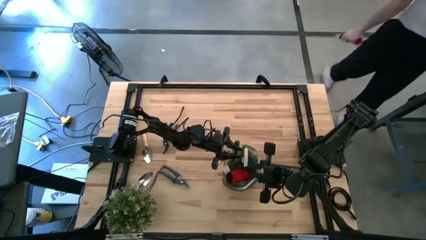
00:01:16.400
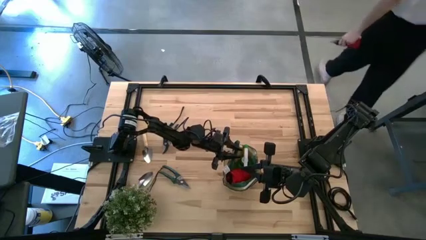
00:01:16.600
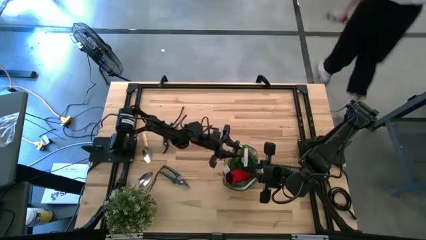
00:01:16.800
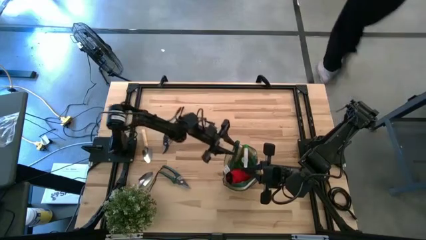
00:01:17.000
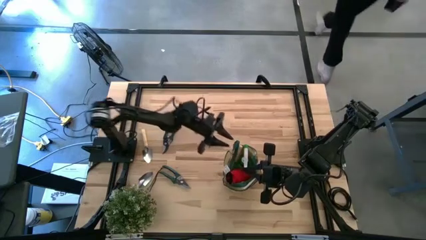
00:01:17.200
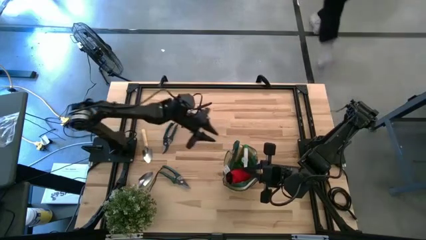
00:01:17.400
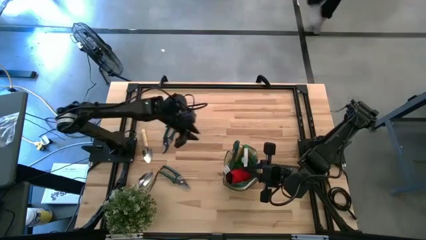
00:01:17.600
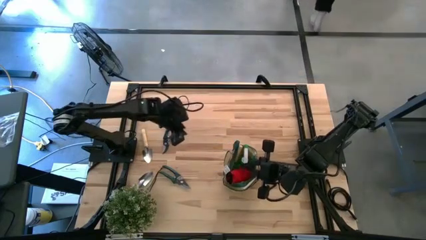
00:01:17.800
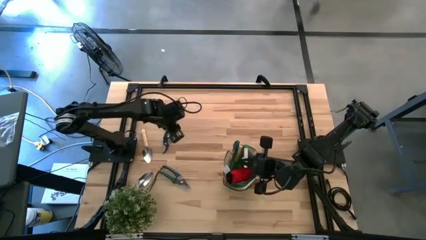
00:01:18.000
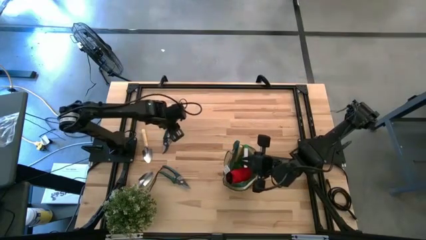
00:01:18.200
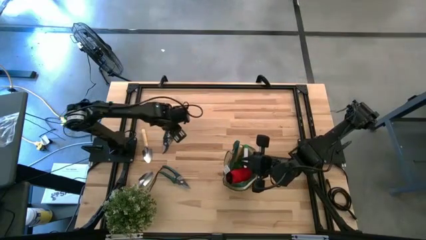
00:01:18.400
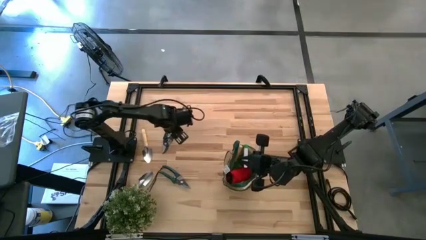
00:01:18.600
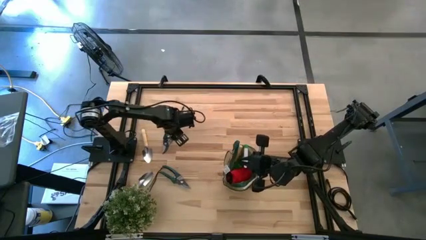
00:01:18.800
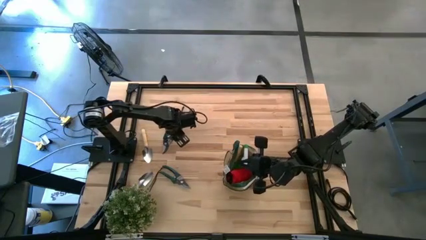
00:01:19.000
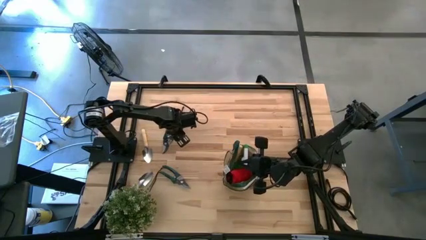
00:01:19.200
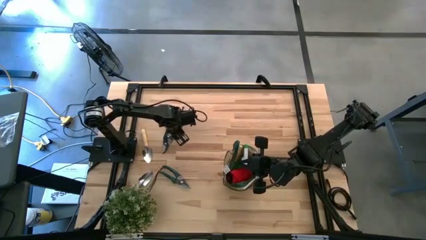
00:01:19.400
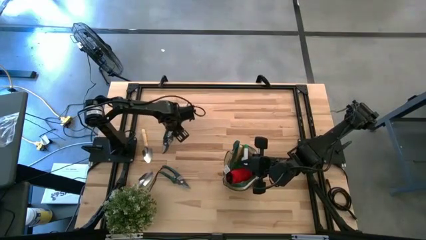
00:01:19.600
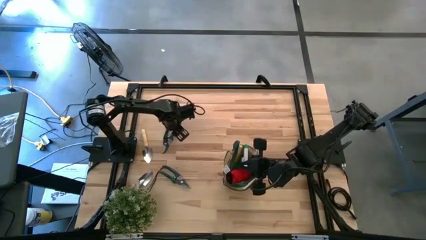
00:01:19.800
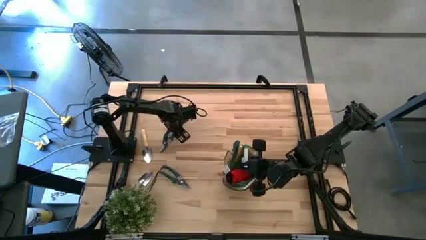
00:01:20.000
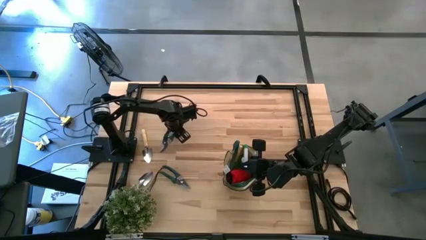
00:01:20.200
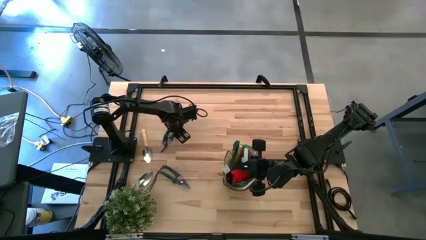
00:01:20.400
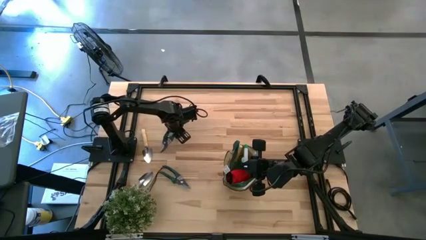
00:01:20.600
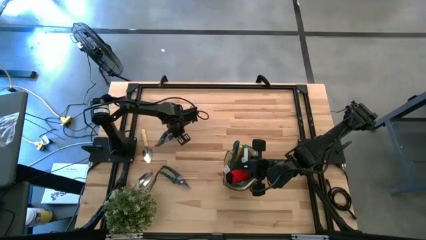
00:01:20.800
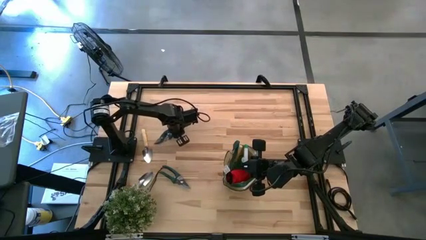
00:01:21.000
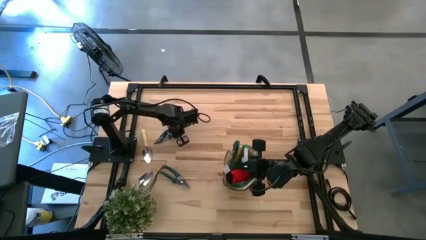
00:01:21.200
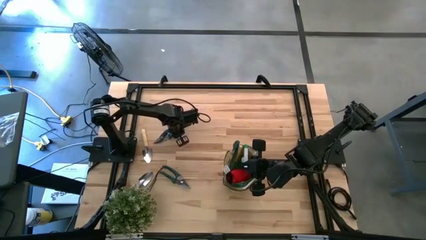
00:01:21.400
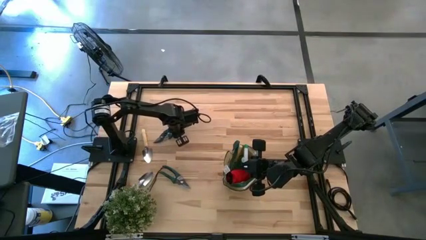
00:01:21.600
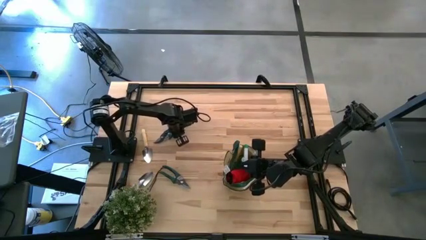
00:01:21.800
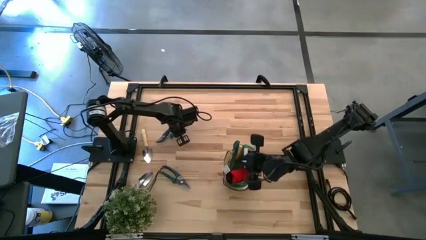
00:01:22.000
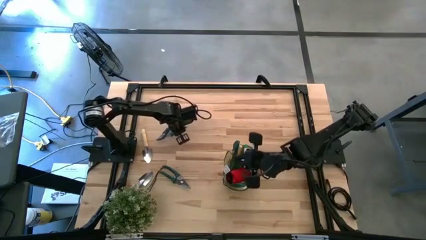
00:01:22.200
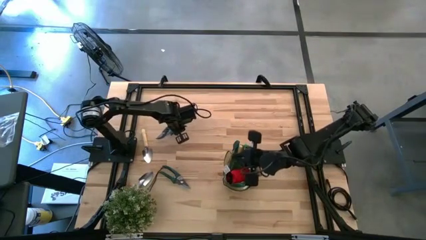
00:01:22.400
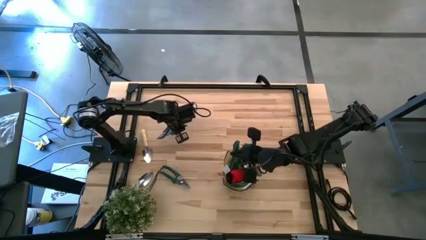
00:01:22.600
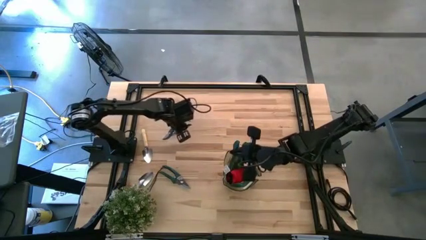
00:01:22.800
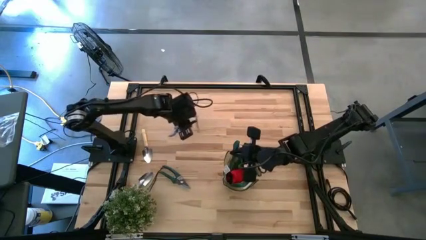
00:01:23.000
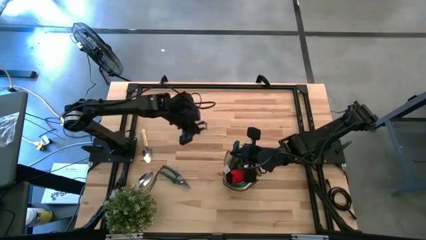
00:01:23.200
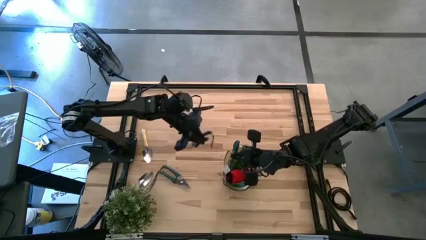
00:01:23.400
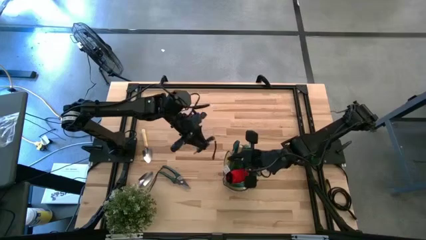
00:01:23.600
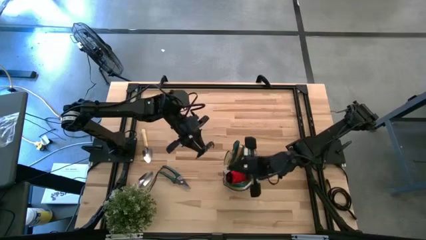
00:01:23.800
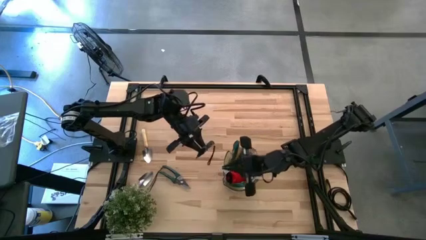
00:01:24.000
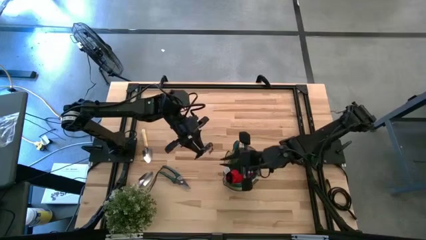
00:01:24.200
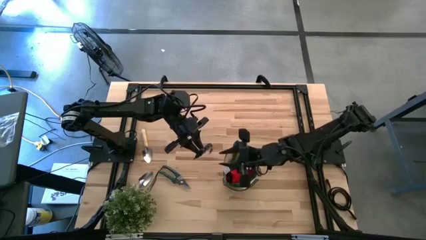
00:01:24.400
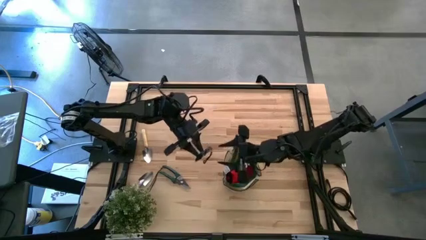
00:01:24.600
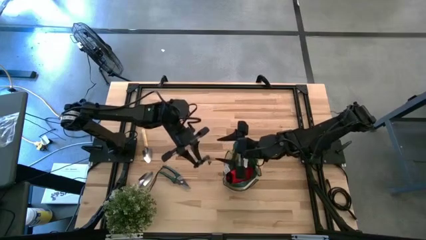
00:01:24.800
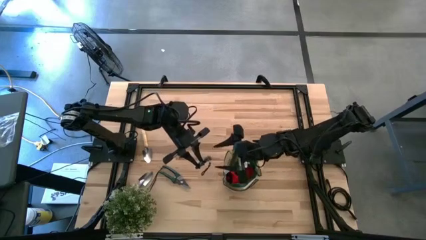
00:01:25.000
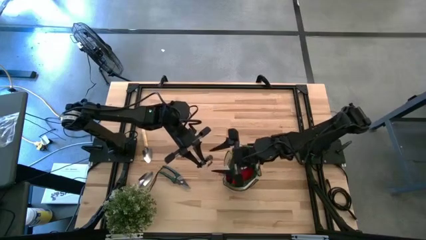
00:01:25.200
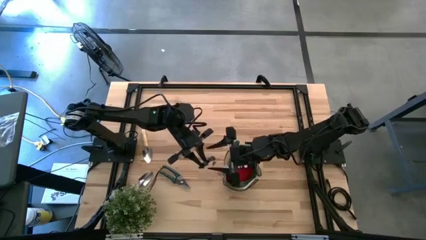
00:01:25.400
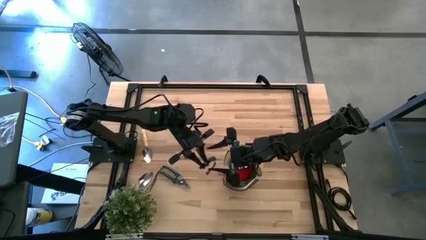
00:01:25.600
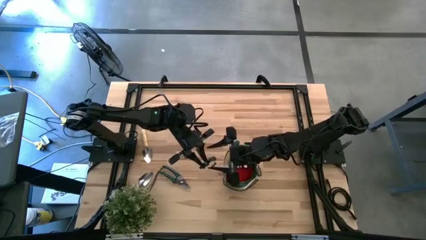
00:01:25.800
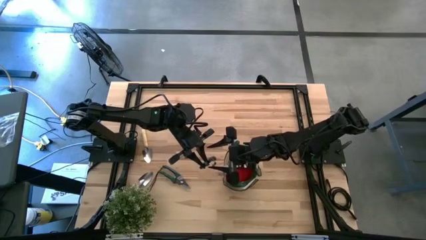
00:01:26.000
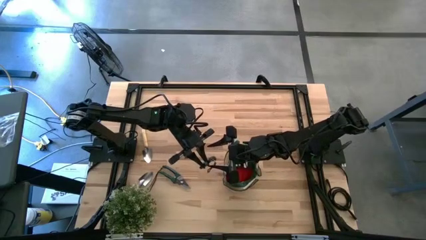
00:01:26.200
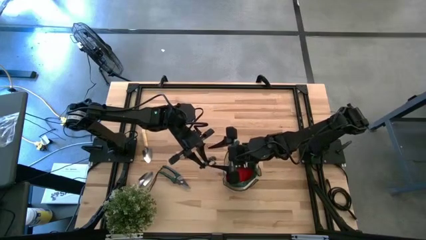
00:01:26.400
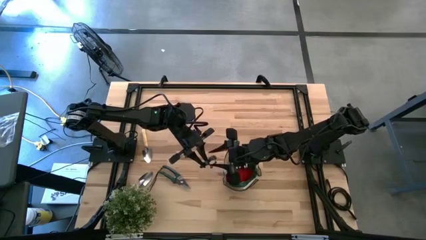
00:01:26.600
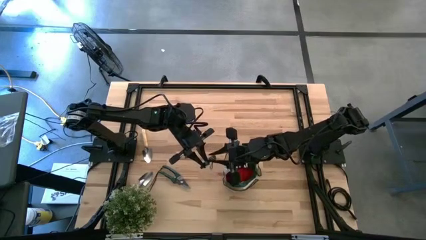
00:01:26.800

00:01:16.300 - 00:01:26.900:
Task: Pick & Place Garden tools in Gardening bag
Put the top green shear scissors into the green gardening bag

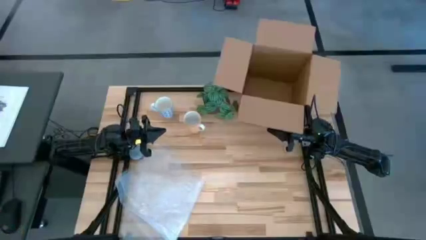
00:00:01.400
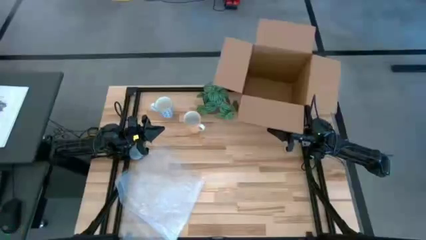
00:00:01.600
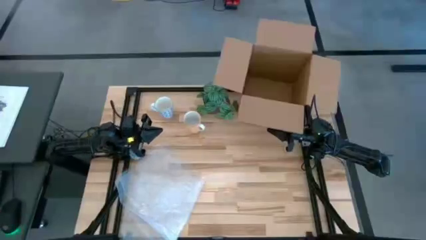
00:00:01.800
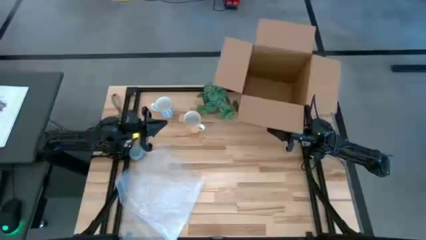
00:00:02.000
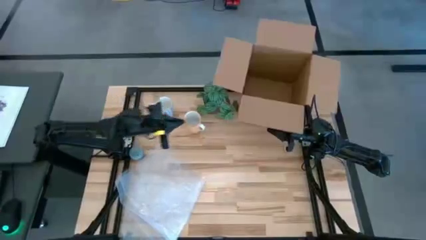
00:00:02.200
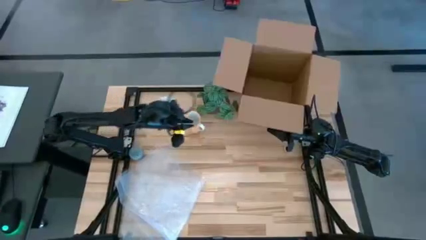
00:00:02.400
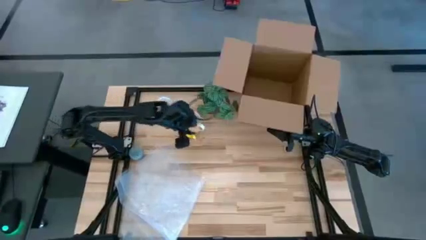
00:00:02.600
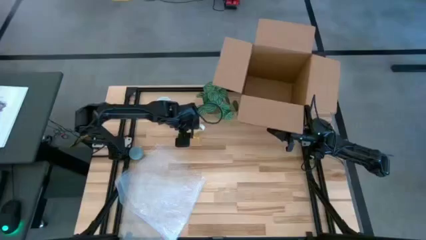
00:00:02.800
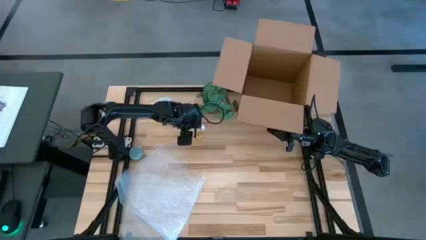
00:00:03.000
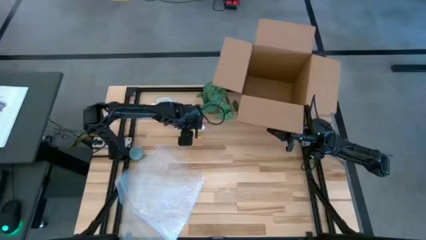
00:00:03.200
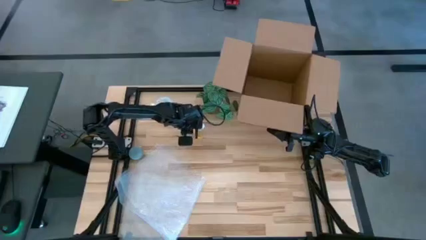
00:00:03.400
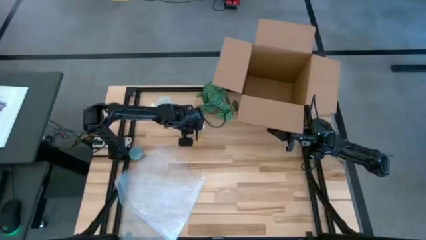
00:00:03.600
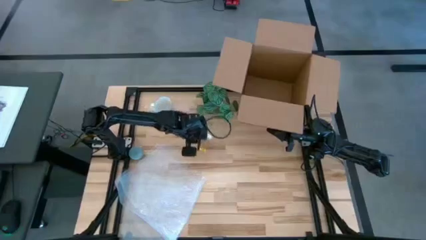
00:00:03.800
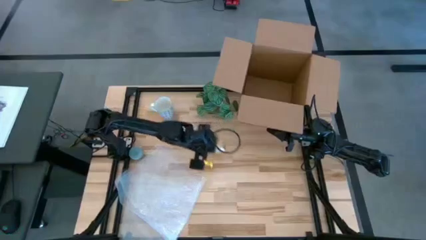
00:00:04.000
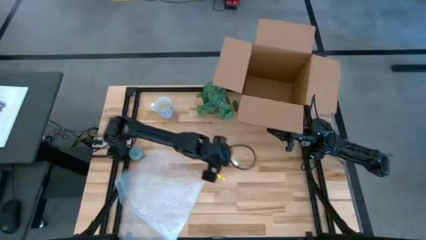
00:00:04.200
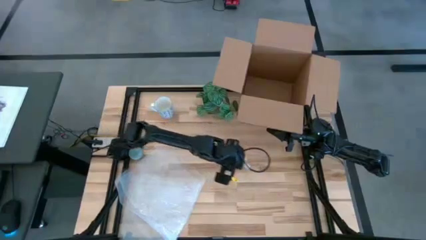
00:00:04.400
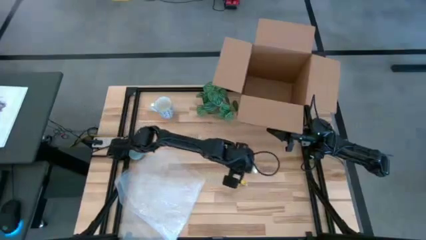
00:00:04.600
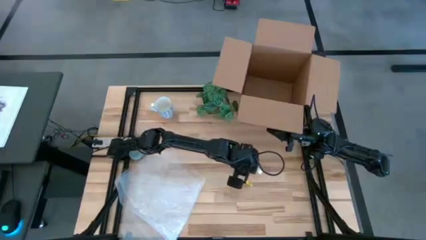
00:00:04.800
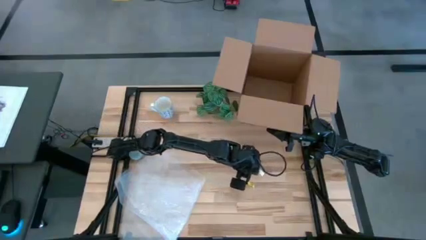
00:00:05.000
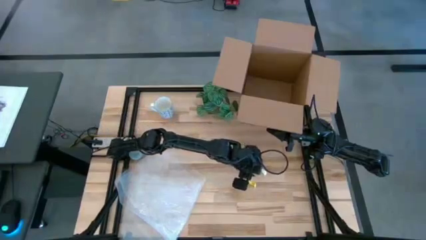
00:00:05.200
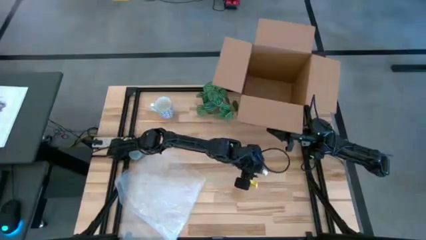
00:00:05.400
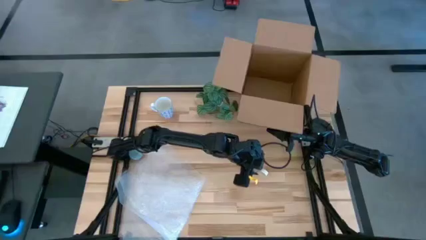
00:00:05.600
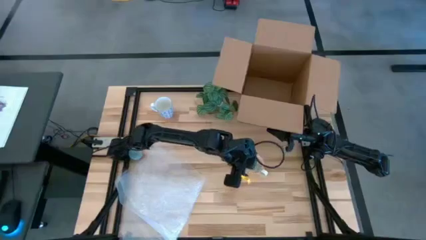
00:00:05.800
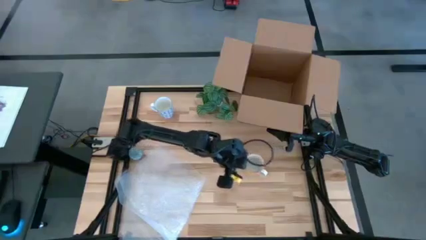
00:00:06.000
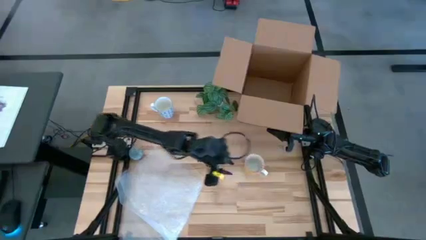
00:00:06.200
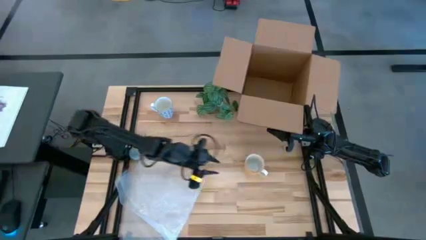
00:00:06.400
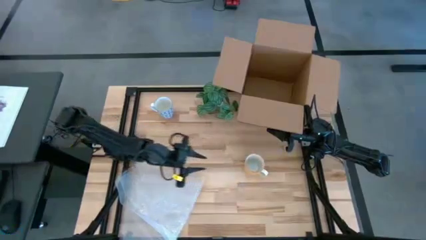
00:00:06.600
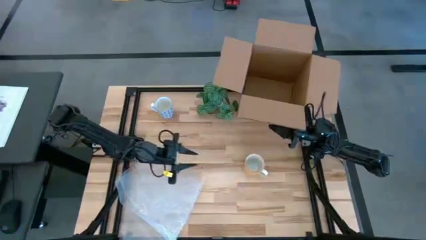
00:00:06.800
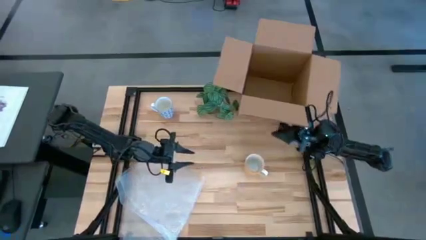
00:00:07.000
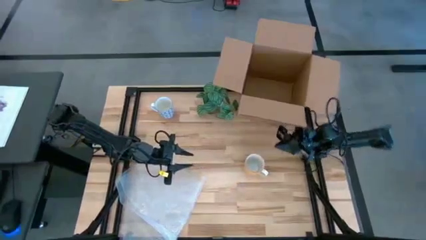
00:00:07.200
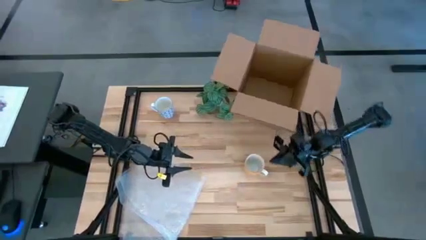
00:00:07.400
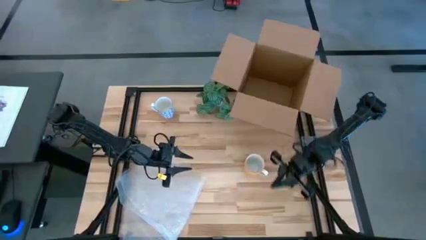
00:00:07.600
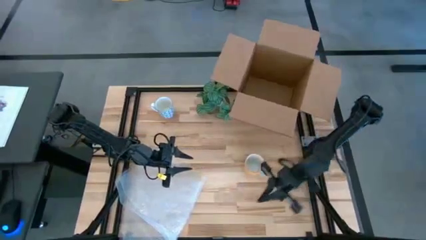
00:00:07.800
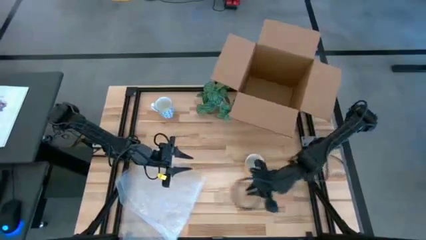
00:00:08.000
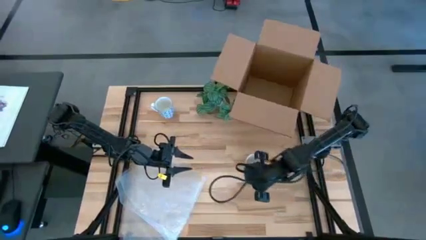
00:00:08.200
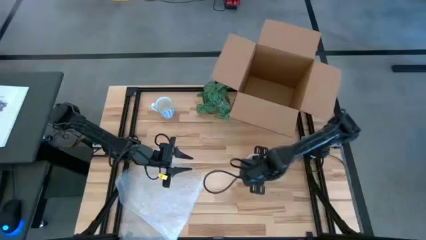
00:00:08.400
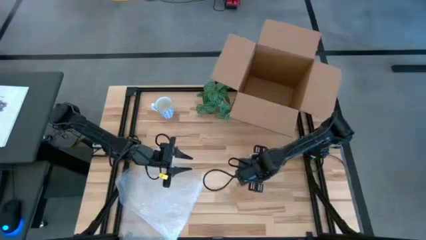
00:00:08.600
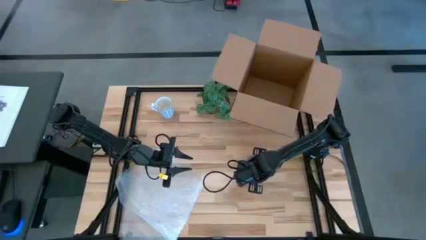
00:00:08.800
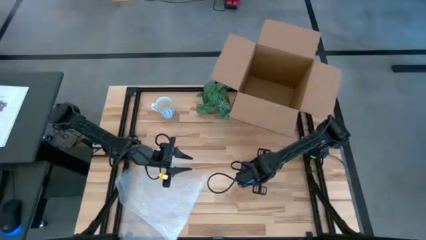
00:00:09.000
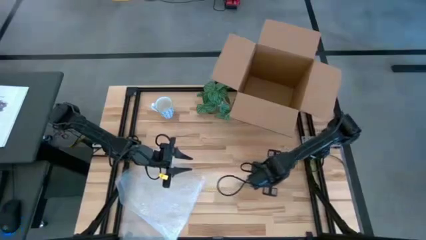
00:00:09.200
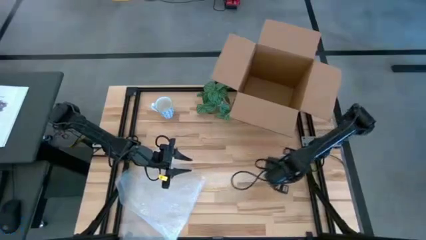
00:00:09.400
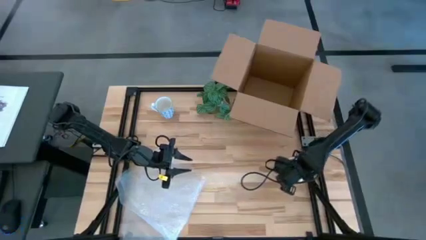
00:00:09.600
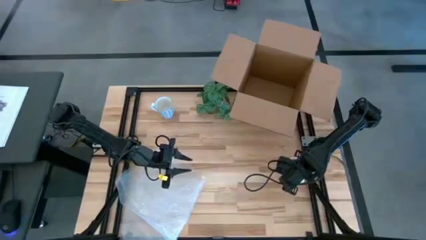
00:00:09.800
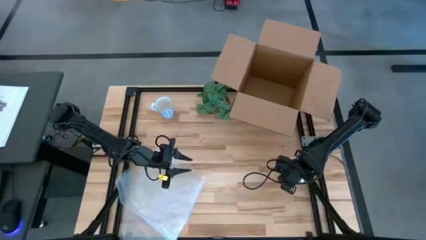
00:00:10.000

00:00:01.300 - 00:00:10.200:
Task: wrap mug
Move the yellow mug to the right of the table
